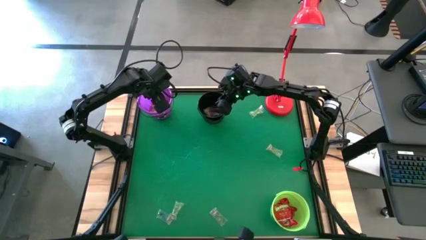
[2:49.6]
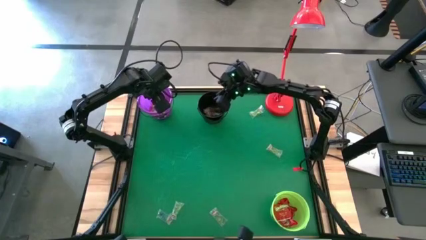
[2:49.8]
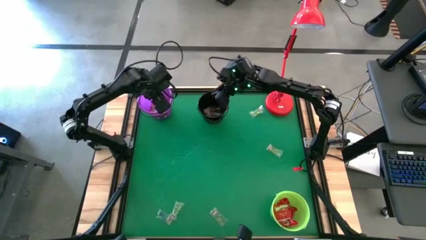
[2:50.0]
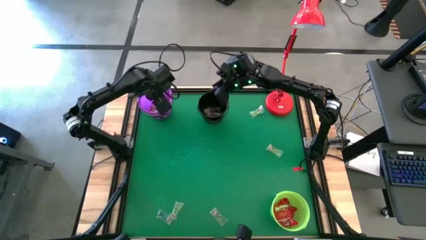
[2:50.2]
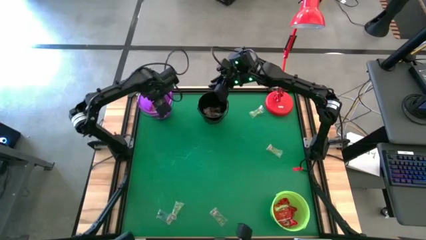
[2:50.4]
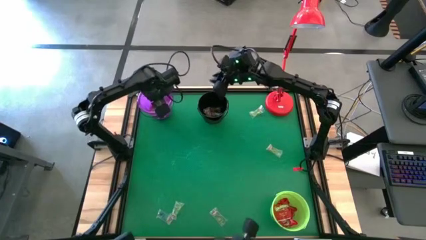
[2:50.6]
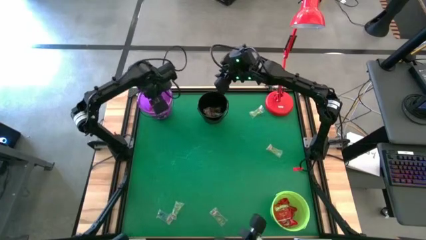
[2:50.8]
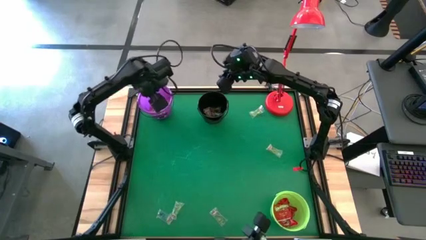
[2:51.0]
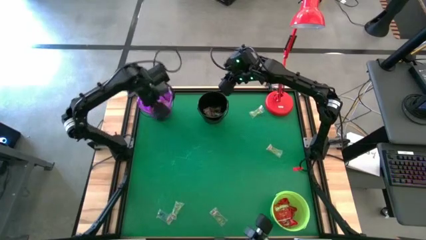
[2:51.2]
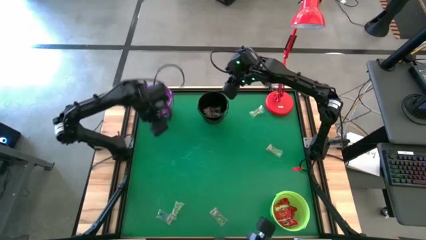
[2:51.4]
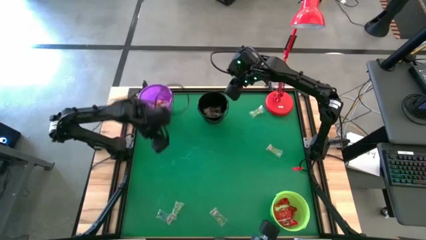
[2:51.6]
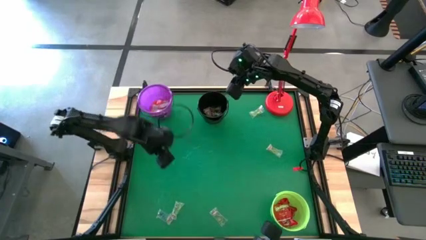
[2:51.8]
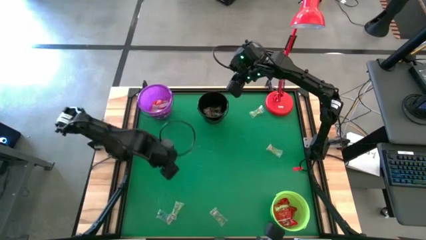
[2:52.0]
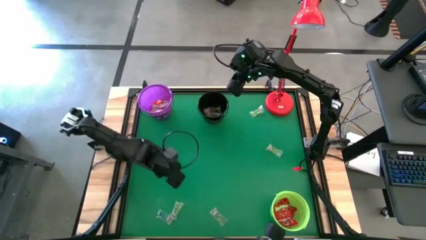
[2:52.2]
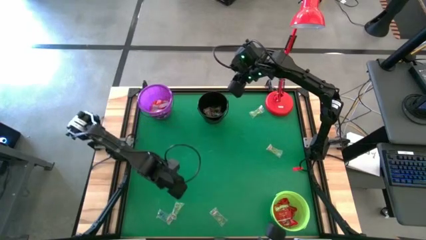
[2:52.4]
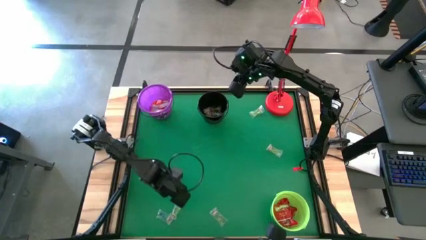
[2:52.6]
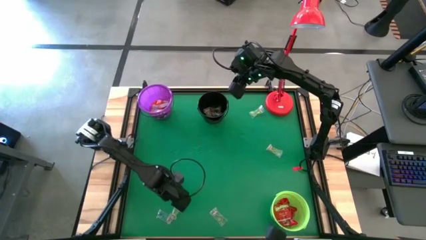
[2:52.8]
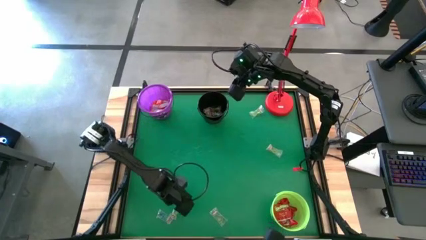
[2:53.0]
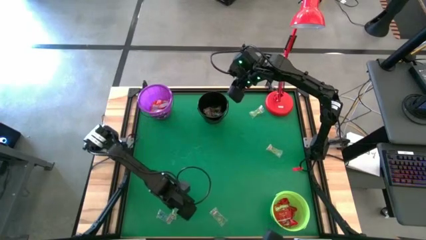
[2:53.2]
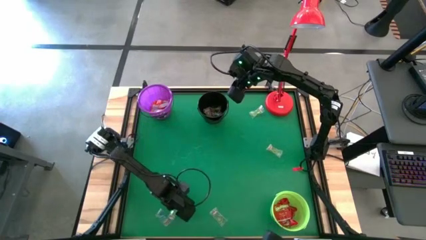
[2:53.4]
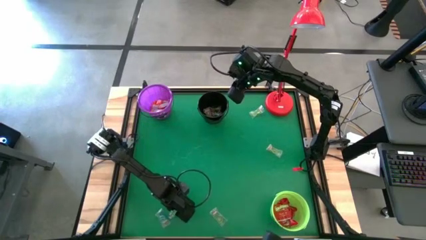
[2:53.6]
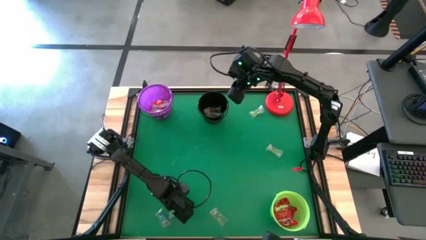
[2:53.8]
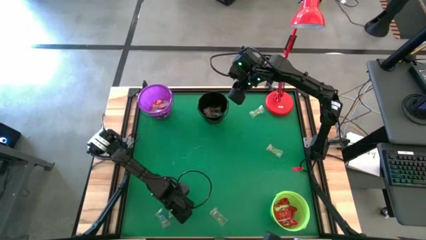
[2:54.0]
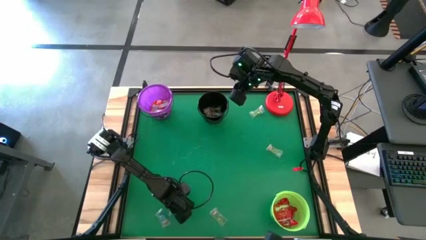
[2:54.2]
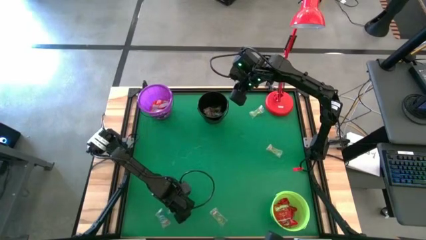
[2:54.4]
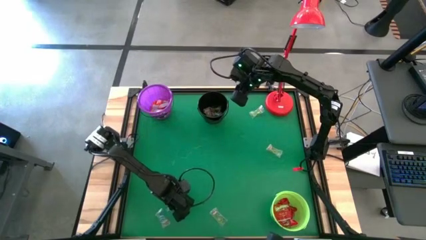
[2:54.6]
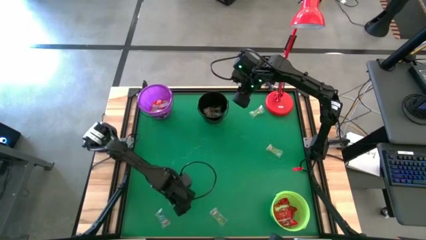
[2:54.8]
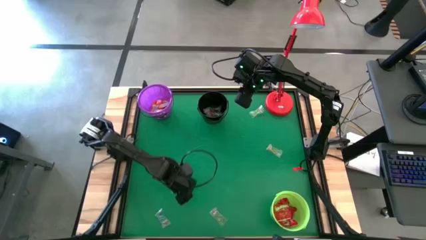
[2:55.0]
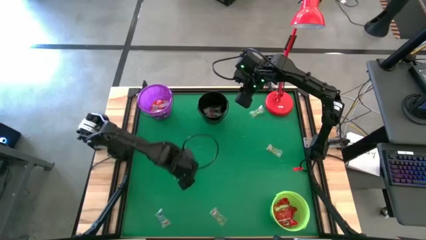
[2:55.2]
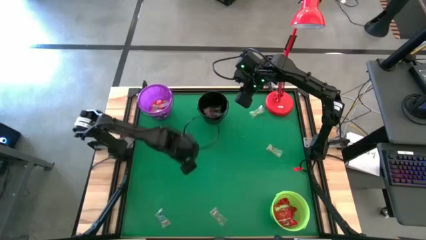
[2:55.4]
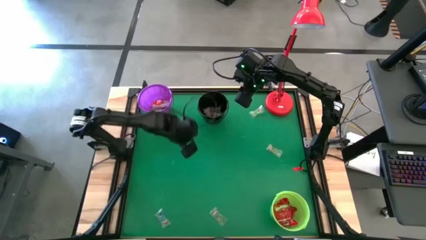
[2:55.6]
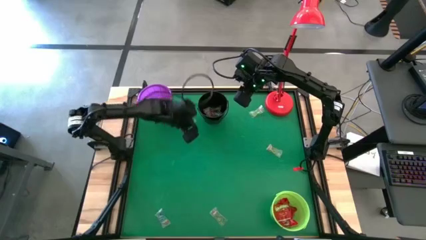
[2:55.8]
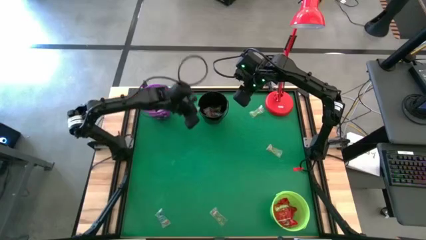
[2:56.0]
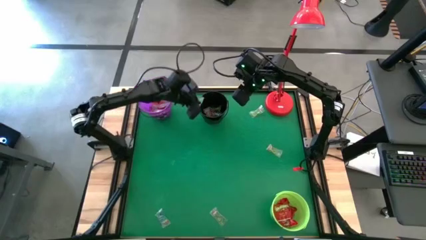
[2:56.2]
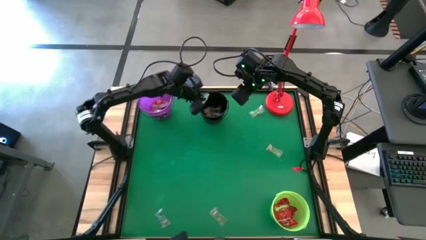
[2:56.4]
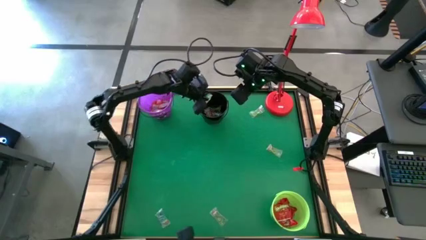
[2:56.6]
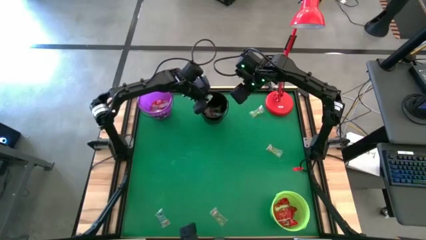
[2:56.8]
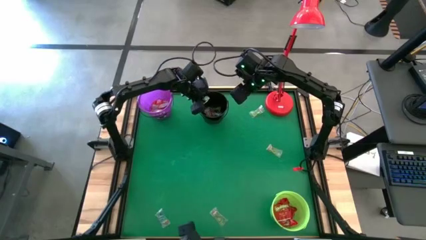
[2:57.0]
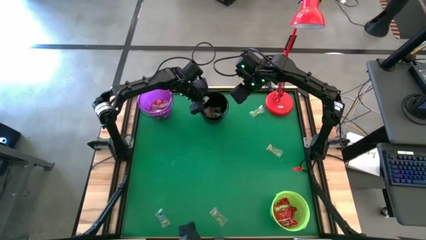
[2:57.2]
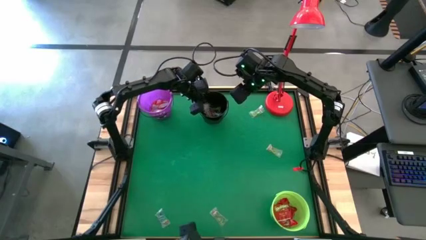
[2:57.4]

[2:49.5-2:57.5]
Task: Sort candy
Put the green gummy into the black bucket

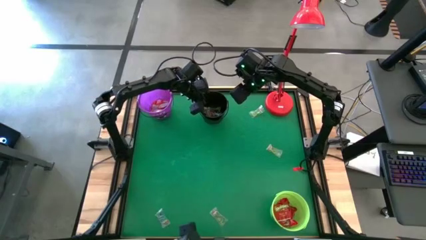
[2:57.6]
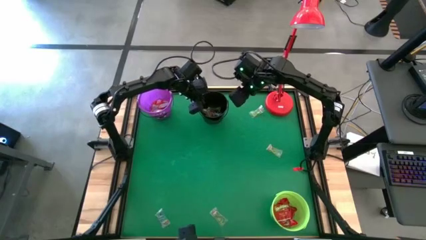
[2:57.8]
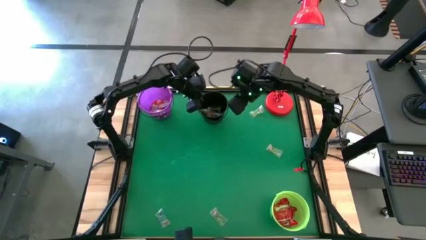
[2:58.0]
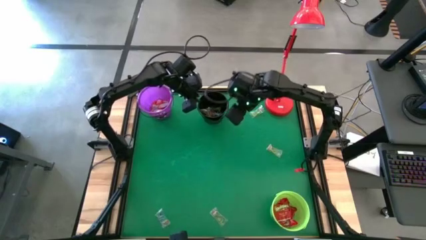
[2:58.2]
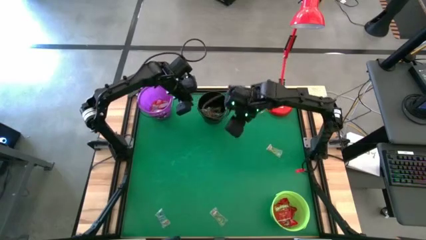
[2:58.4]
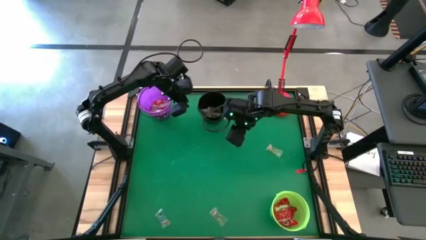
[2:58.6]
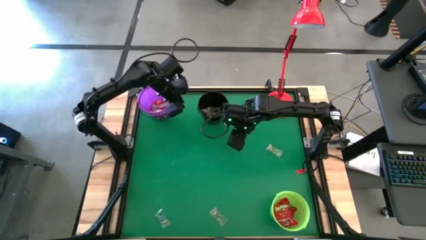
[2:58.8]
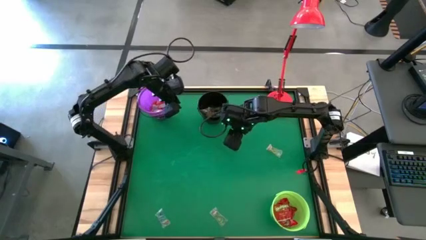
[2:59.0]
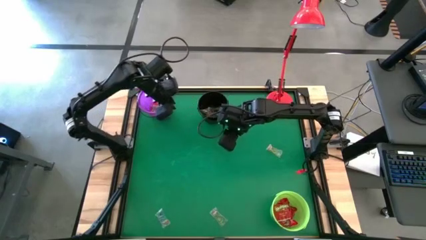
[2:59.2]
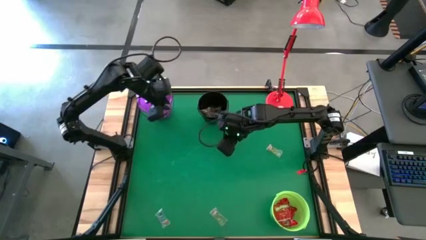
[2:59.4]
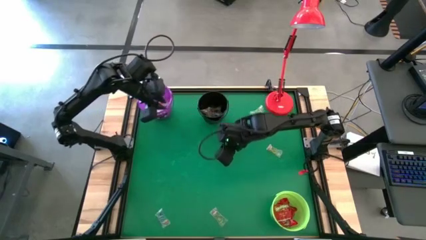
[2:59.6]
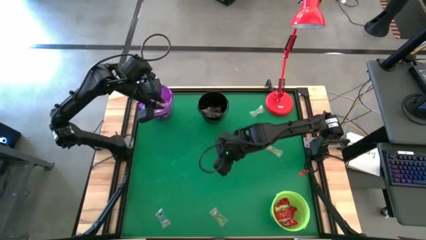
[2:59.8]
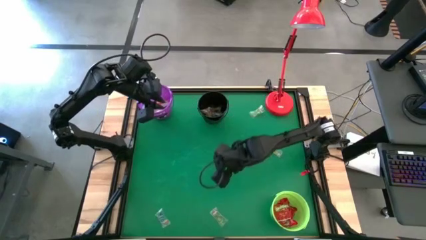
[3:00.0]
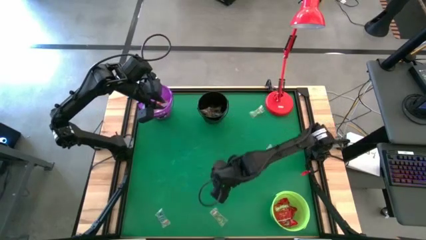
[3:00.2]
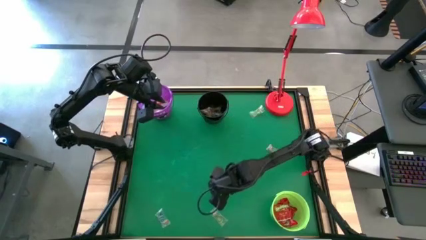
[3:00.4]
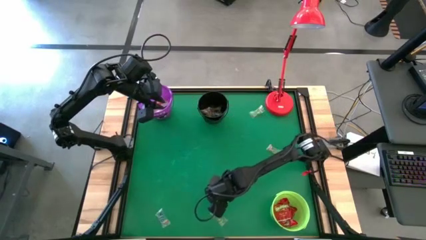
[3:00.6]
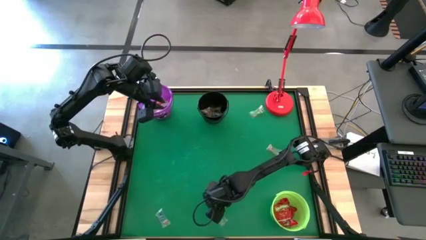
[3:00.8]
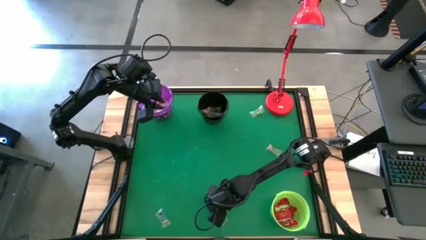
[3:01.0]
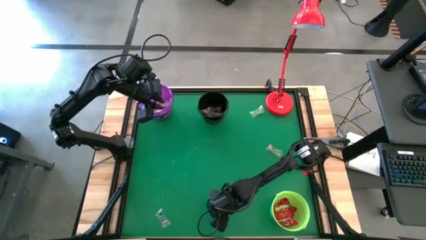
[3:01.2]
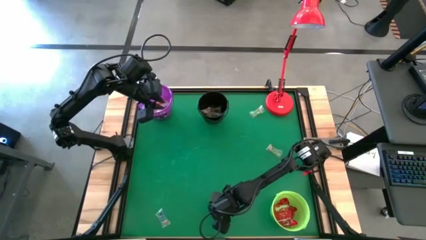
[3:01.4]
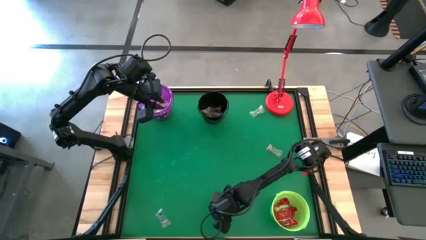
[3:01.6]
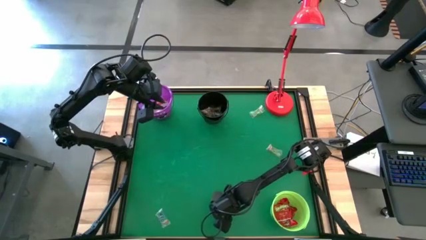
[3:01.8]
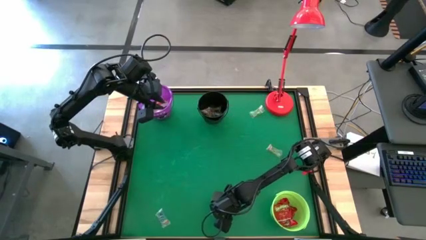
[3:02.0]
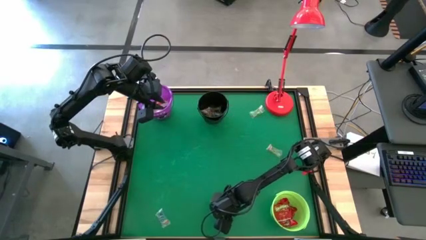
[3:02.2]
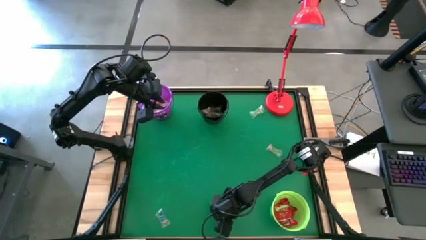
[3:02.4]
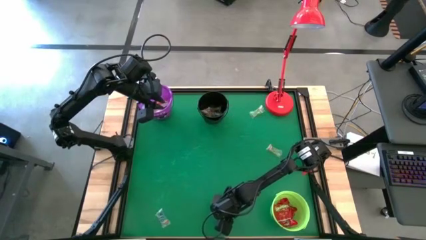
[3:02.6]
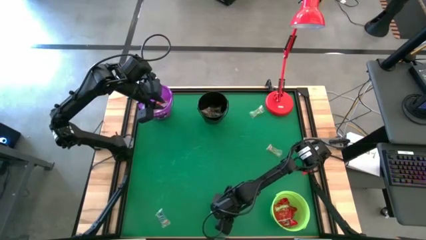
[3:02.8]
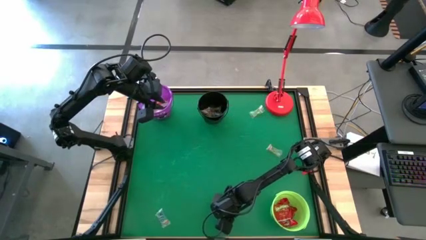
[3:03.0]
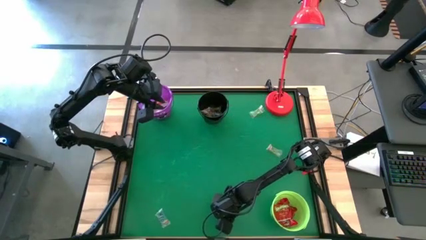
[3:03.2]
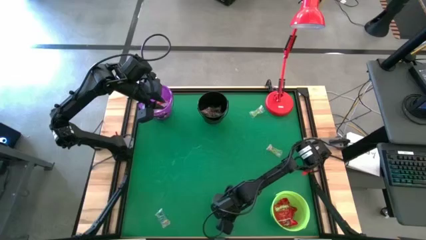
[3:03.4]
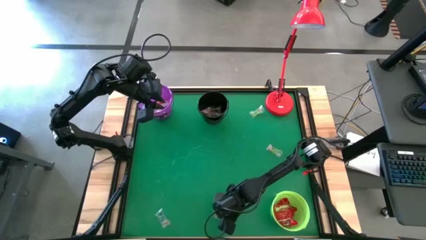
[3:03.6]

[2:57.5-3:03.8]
Put the bottom green gummy into the black bucket

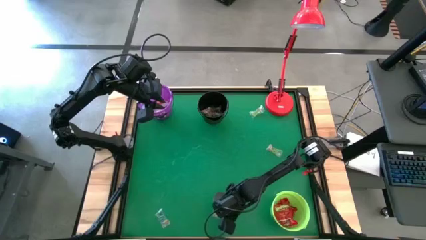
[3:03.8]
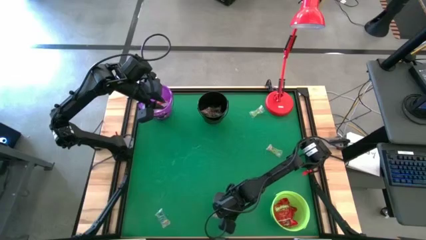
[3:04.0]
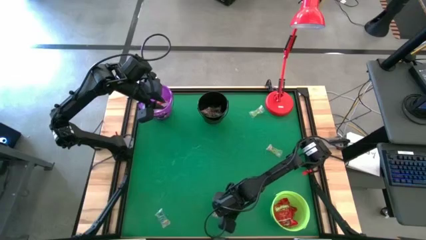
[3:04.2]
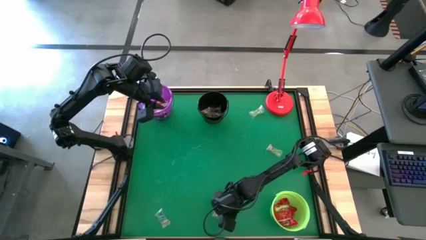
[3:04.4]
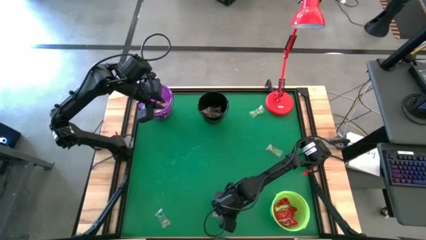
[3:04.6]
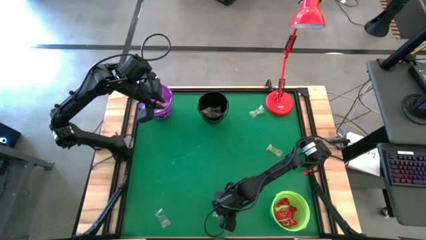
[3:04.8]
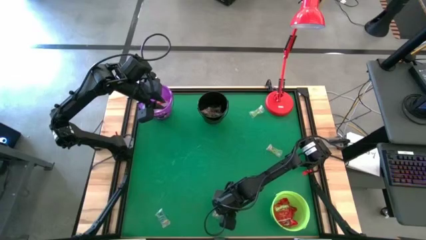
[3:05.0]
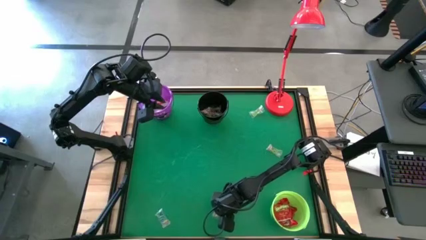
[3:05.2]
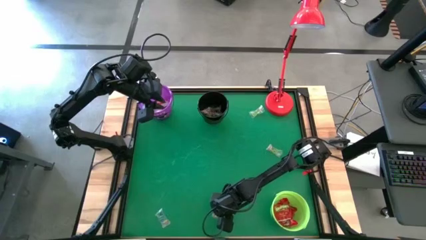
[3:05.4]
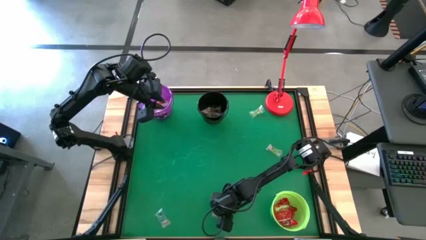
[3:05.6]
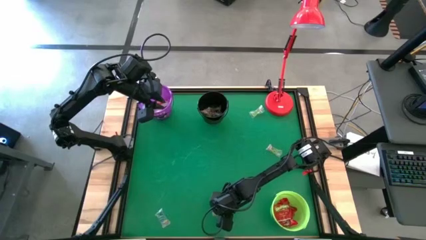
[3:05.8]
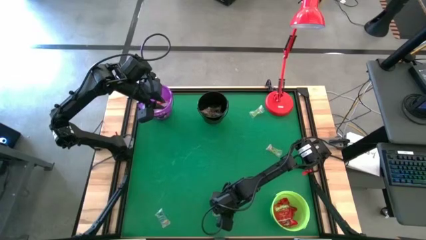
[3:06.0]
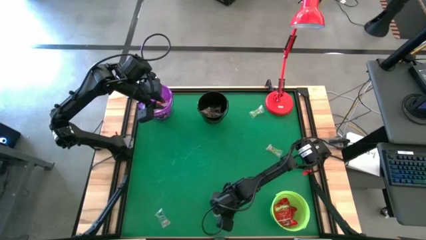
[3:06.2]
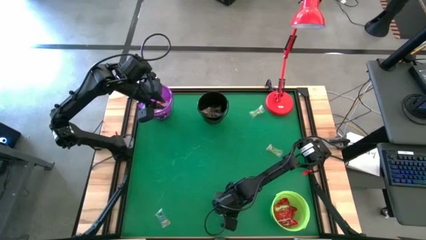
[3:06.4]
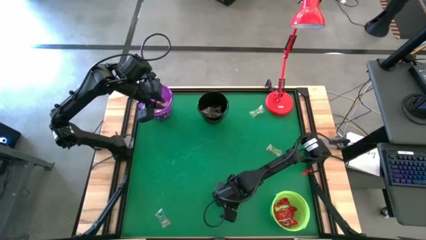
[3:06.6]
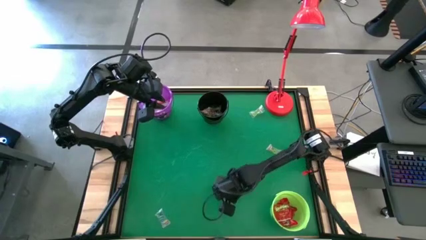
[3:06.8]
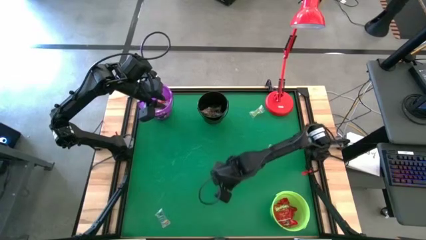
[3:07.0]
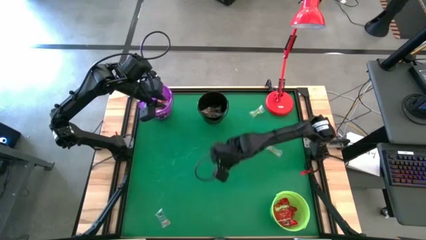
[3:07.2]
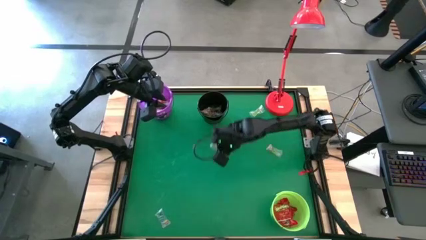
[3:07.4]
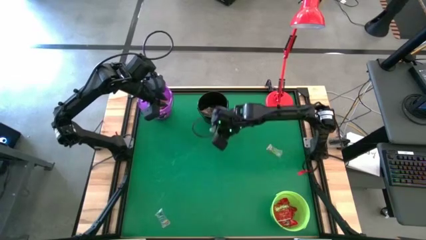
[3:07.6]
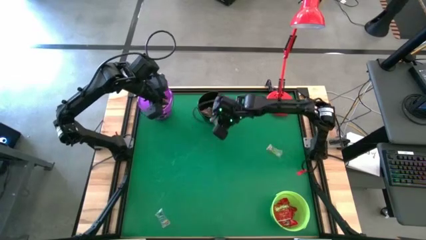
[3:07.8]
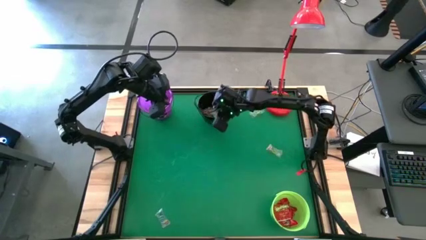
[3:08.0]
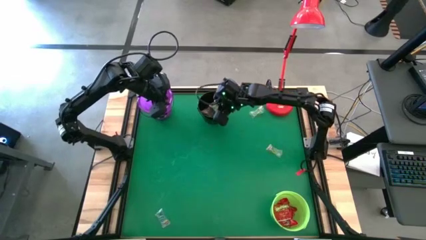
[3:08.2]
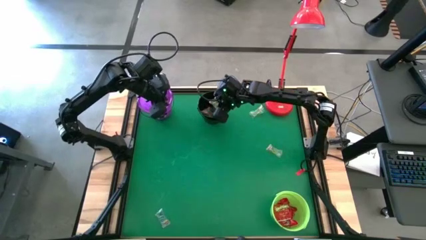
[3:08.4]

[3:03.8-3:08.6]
Put the bottom green gummy into the black bucket
